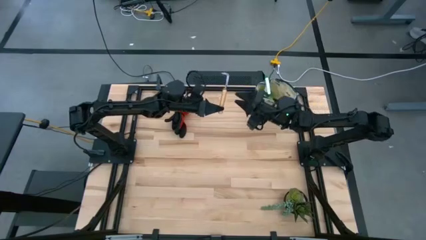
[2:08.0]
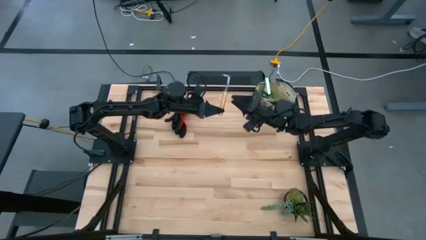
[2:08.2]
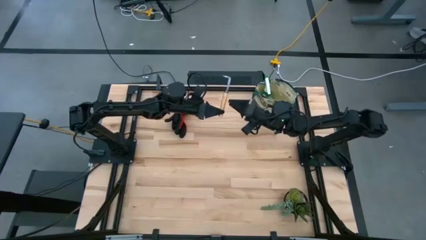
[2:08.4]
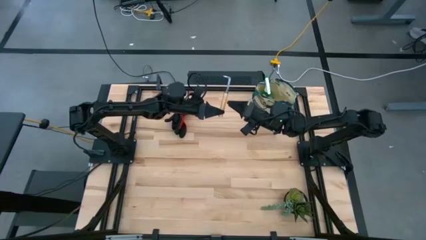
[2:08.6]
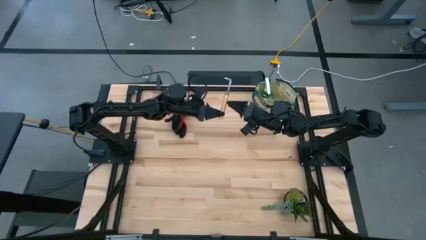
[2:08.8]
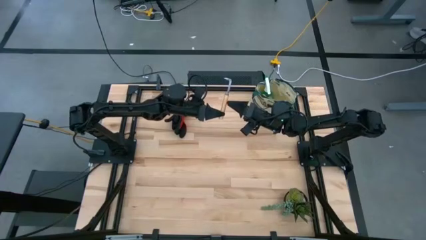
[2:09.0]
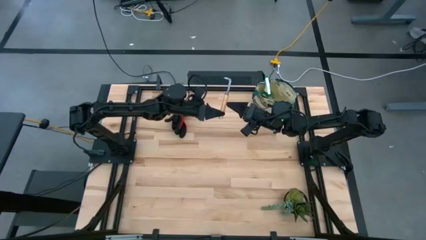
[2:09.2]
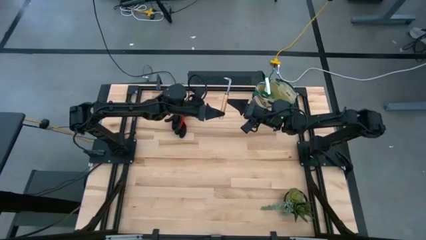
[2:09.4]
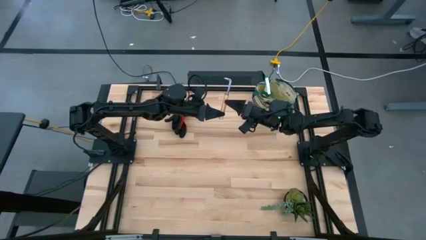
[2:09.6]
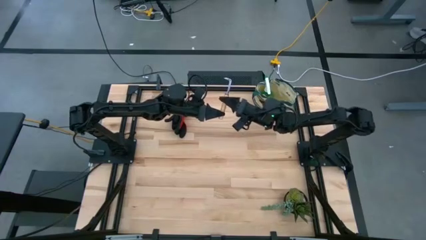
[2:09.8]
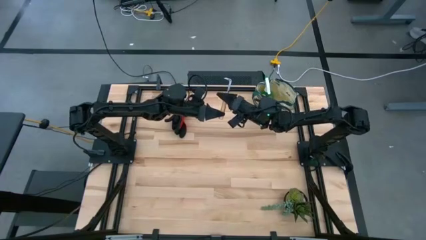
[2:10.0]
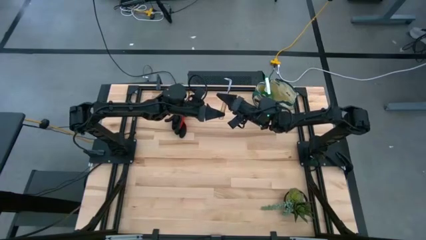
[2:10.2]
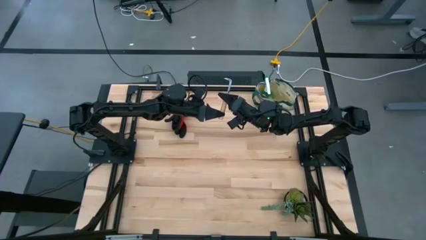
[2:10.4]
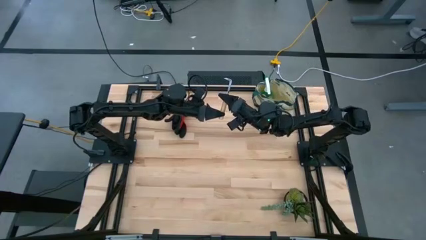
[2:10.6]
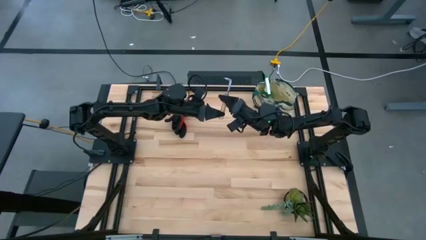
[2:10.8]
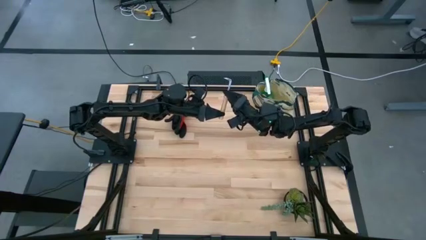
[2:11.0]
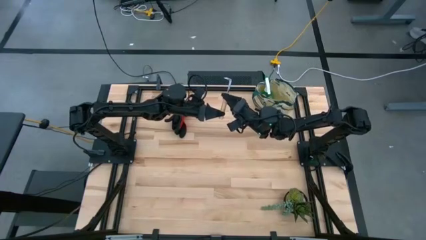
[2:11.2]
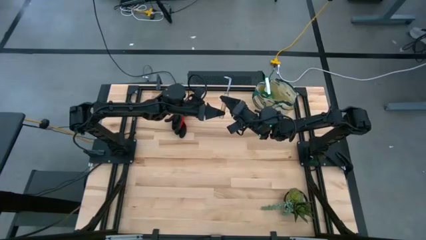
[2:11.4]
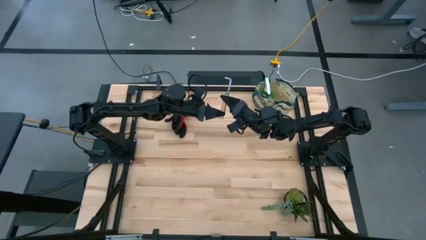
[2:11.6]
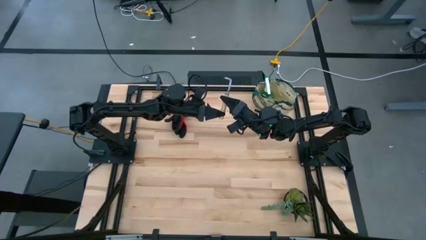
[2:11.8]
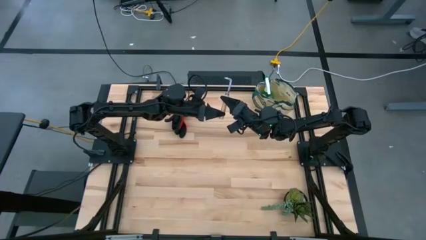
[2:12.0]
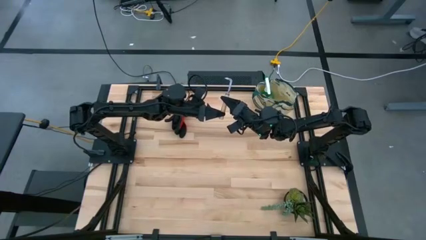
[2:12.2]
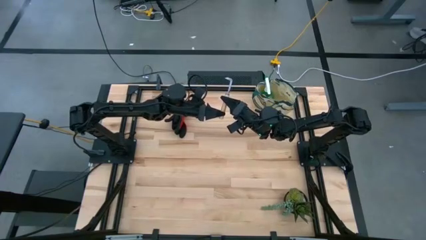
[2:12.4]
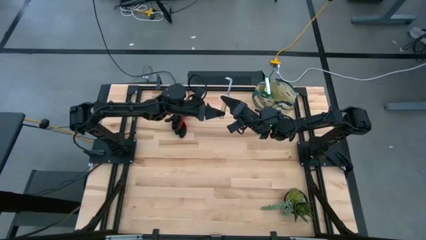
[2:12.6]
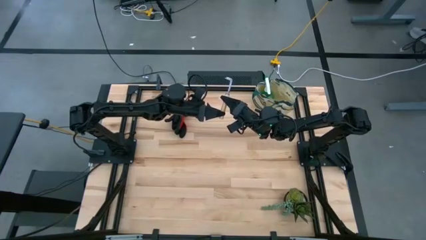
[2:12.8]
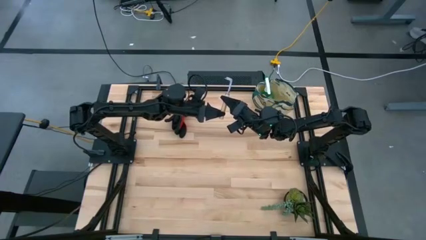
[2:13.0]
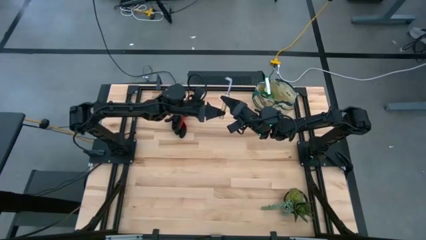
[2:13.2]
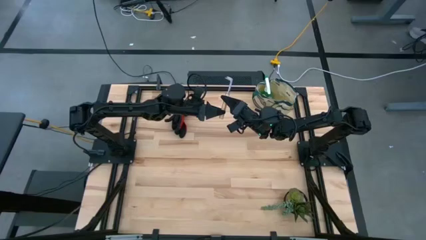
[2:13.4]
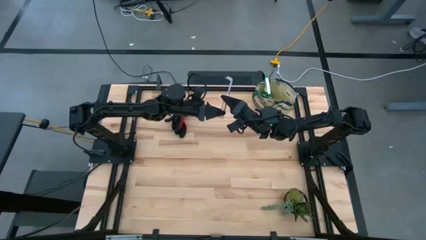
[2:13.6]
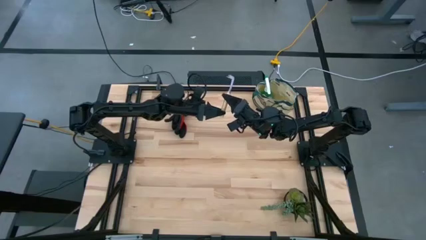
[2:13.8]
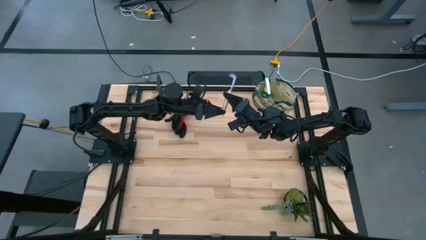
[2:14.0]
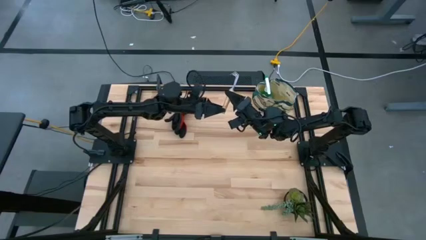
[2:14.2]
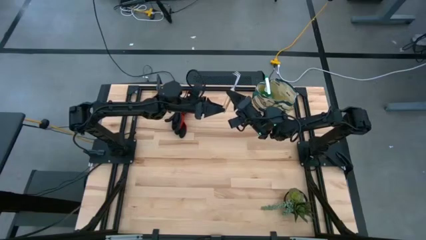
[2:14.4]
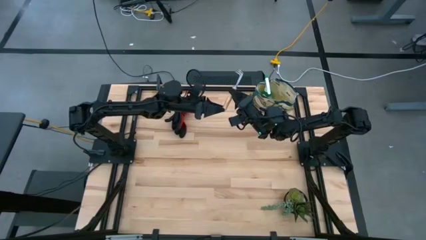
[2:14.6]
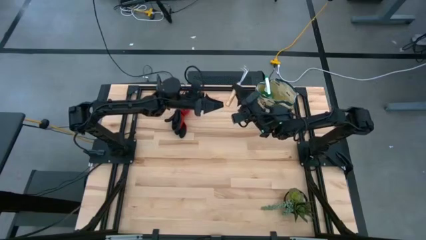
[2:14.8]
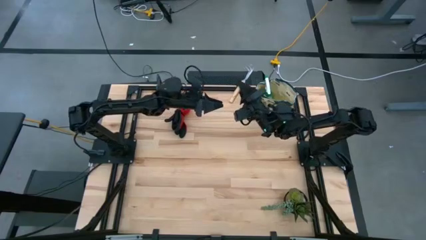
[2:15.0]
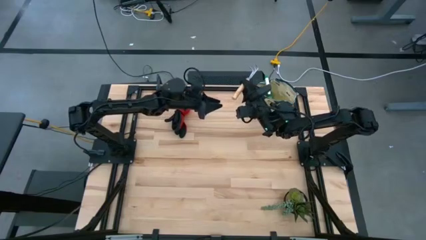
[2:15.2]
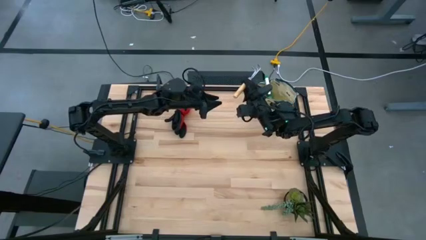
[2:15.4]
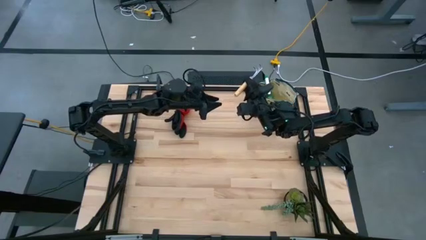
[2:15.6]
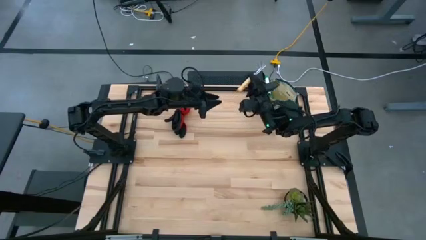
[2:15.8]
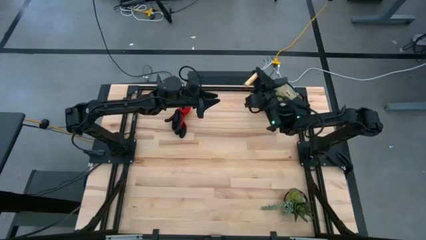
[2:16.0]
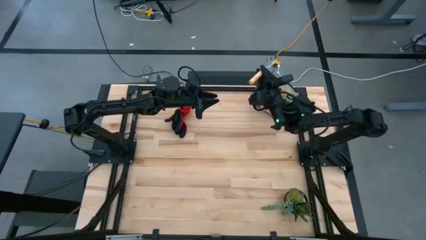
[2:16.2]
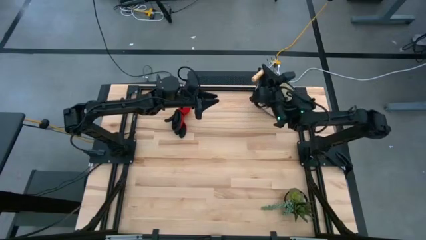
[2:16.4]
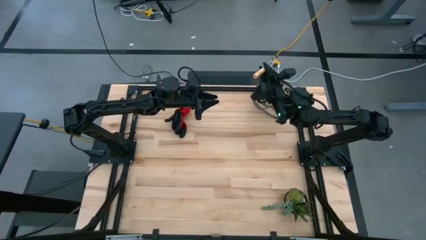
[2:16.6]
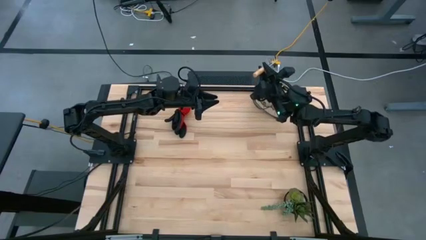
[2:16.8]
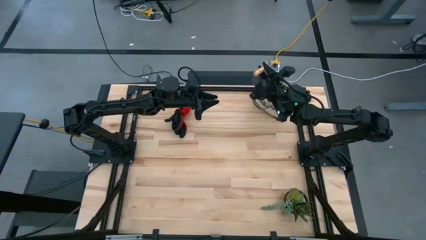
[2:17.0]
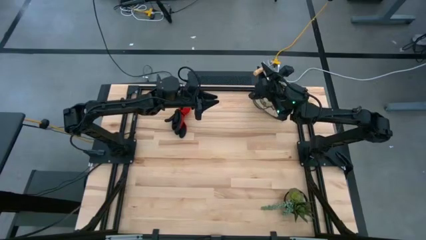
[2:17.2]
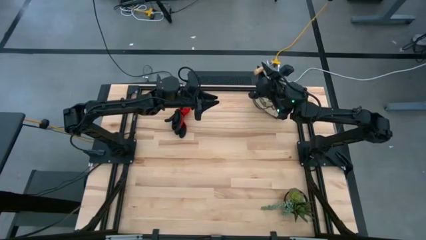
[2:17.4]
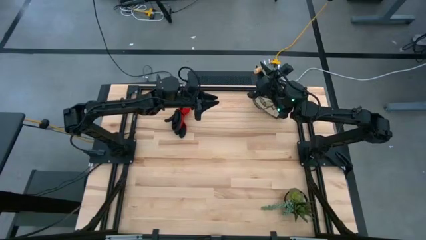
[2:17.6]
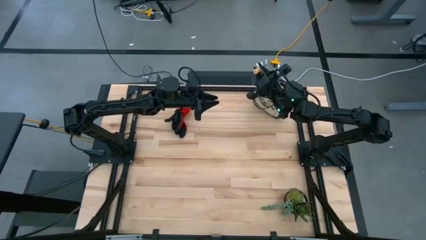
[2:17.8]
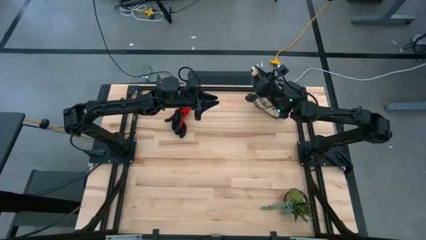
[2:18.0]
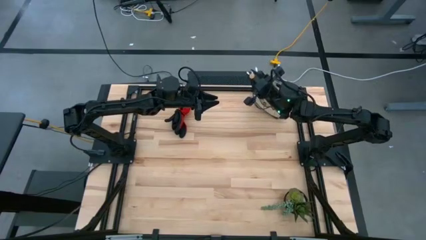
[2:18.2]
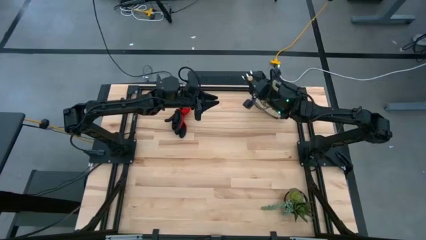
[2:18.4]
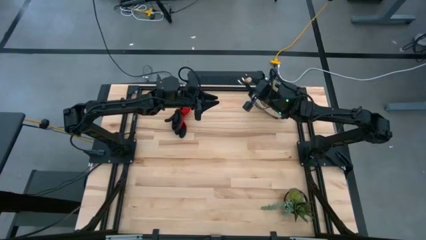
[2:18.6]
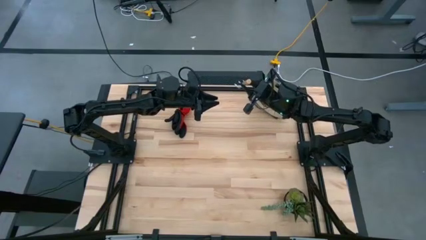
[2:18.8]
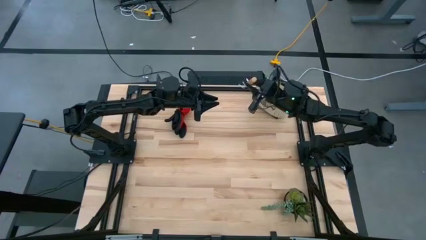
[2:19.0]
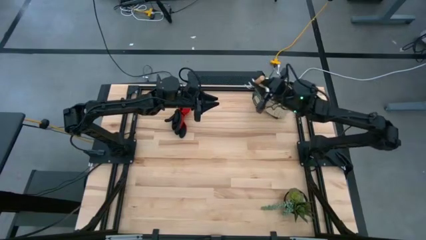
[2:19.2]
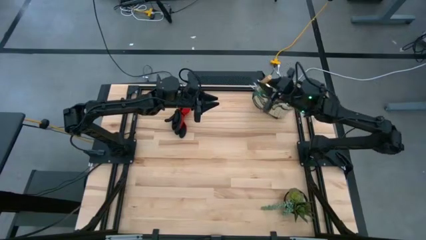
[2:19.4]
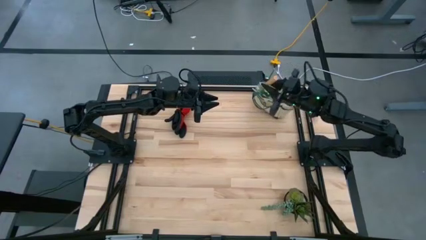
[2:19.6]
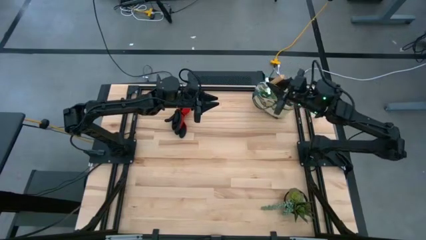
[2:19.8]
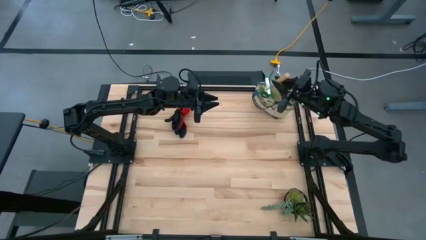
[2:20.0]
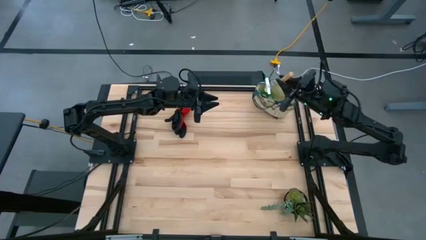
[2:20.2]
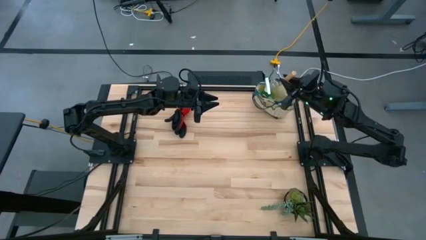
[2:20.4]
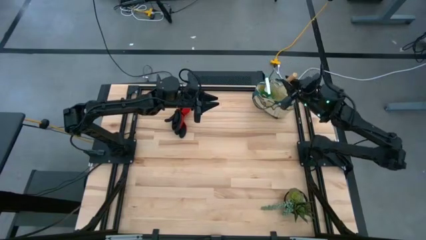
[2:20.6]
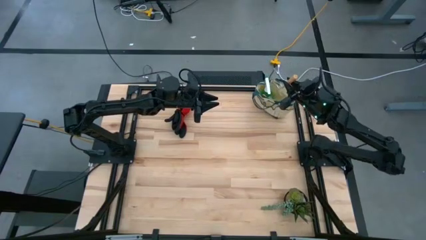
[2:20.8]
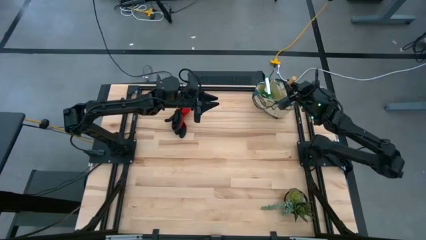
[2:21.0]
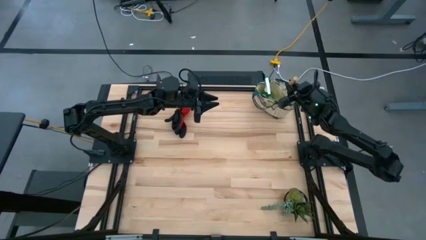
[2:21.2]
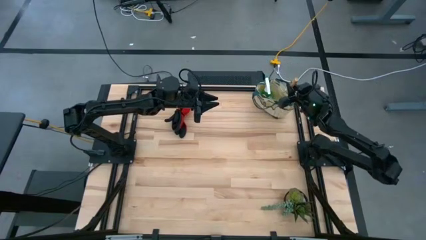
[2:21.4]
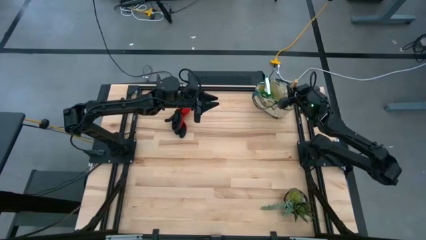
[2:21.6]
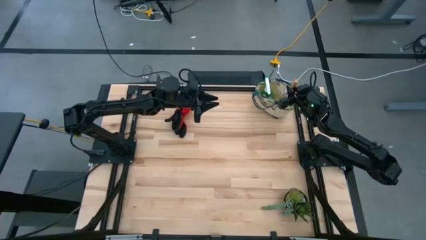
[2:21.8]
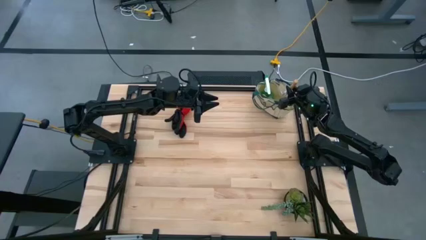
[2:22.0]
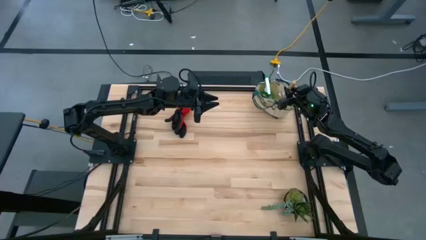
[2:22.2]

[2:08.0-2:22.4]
Task: Pick & Place Garden tools in Gardening bag
Put the brown hand rake into the gardening bag

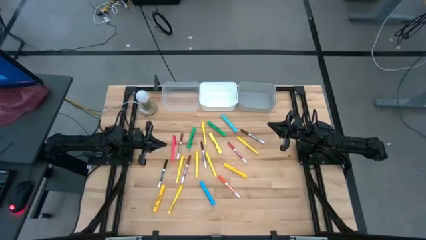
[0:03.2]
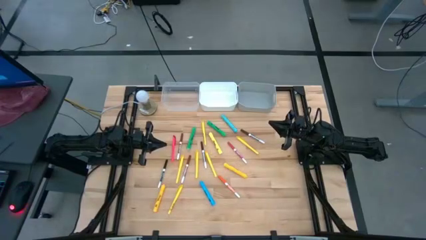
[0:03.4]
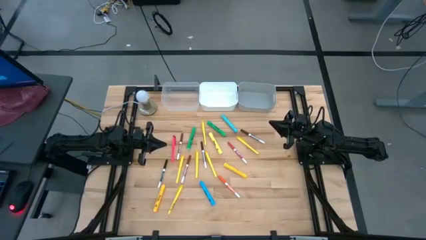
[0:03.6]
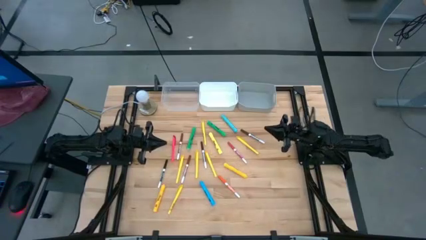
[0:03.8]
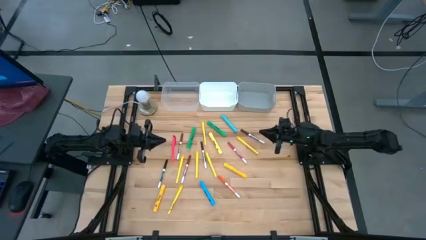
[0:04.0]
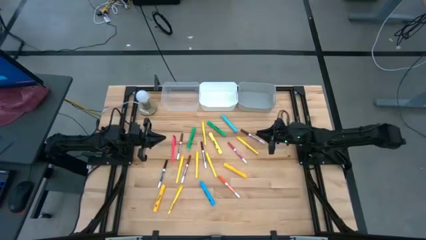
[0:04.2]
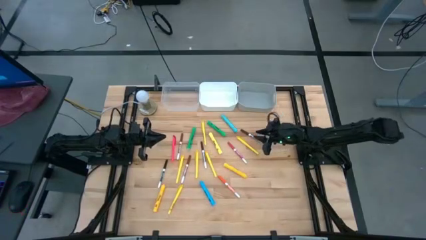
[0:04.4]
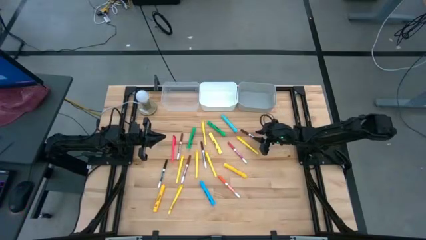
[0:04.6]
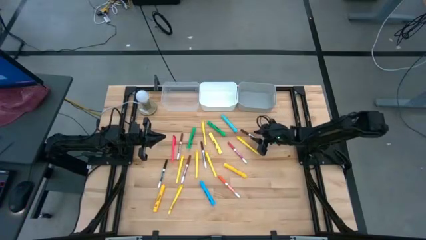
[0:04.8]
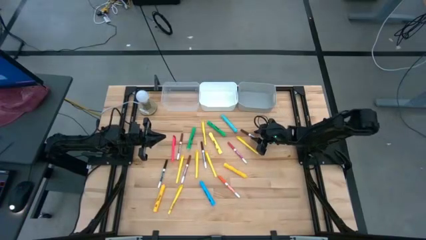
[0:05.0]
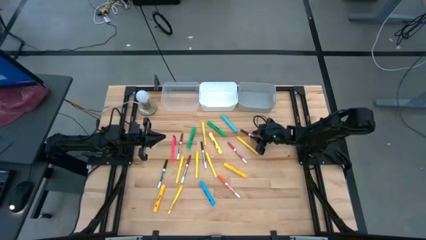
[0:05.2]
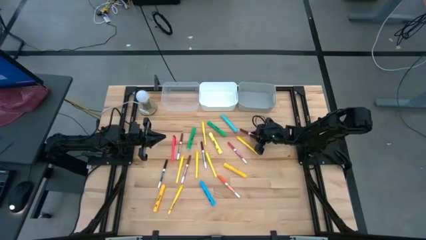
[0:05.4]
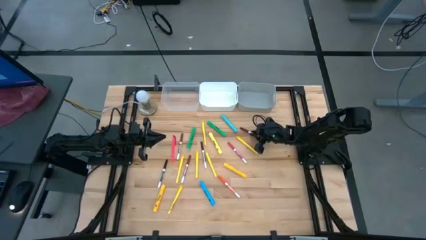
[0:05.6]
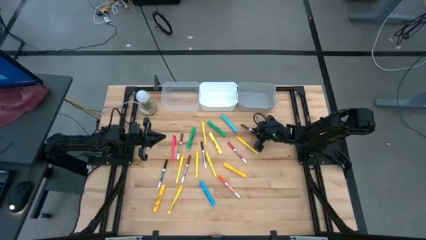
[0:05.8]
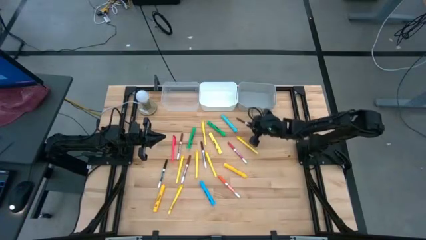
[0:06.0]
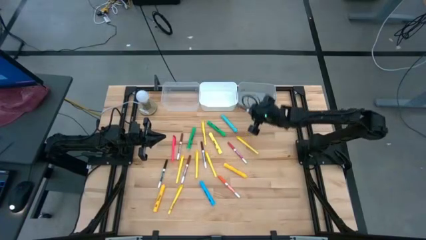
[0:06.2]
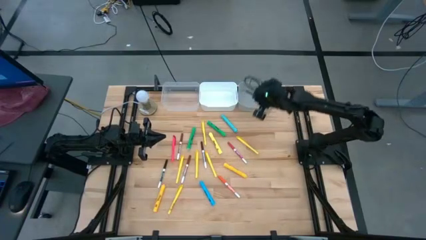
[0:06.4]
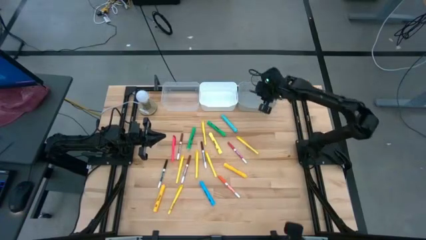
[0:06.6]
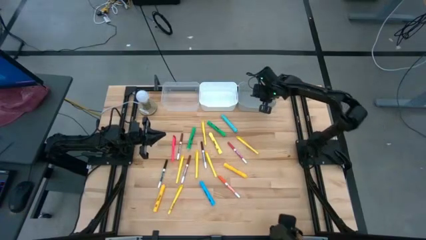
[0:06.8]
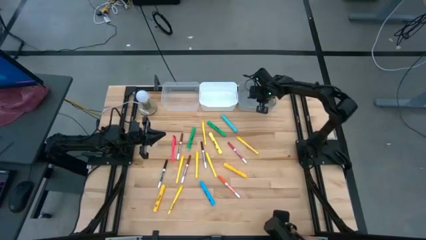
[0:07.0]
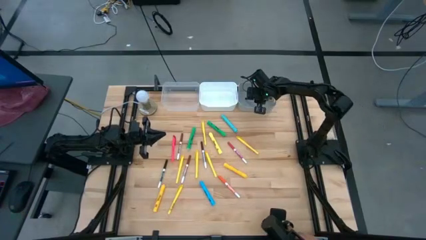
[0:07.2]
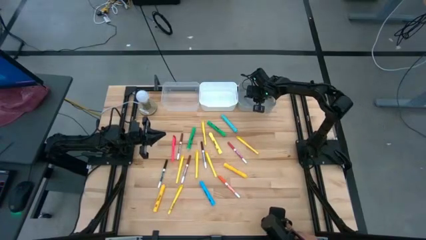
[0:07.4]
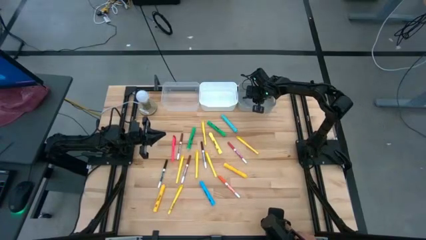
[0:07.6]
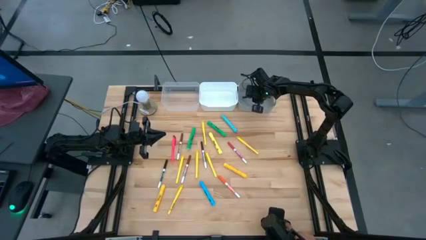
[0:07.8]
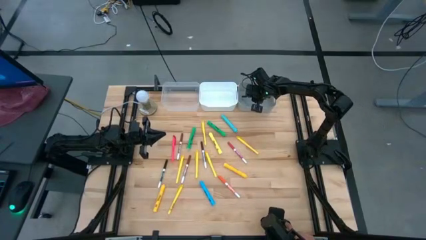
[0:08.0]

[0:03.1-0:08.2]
Task: Pick & Place Markers
Put the dark brown marker pen into the gray bin
